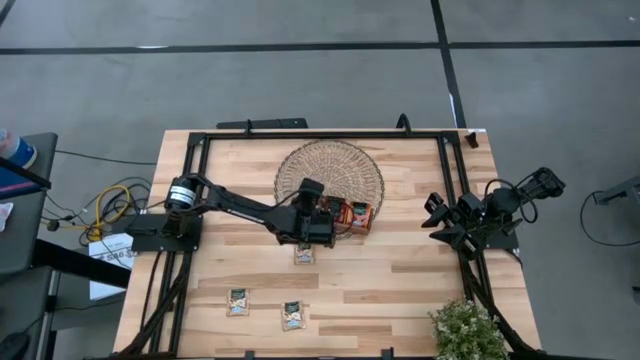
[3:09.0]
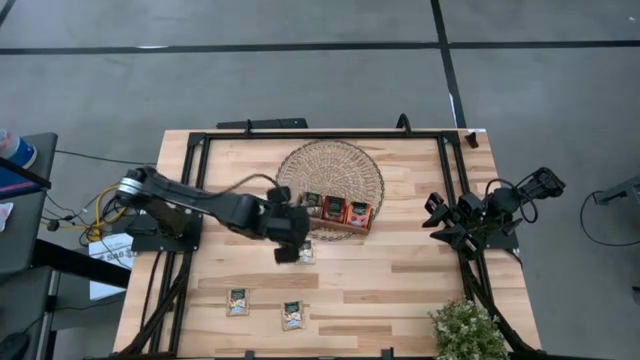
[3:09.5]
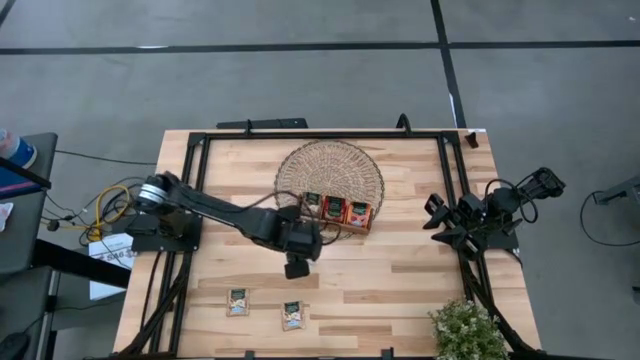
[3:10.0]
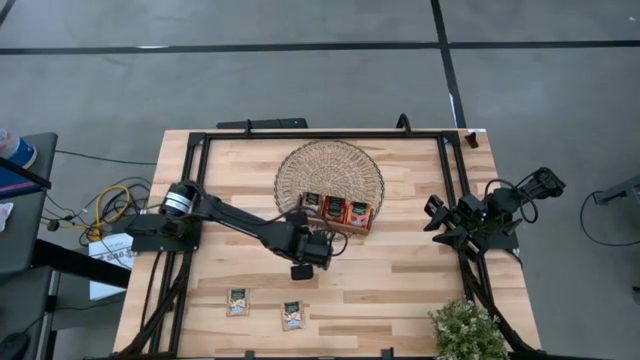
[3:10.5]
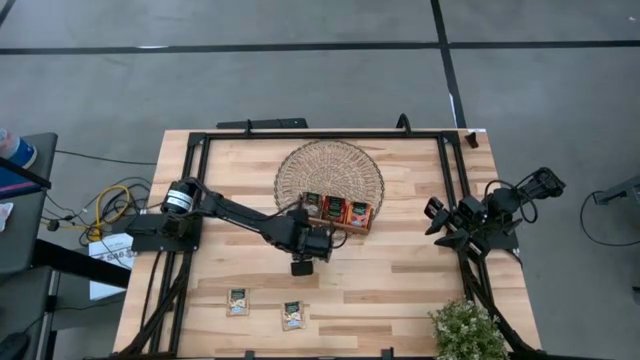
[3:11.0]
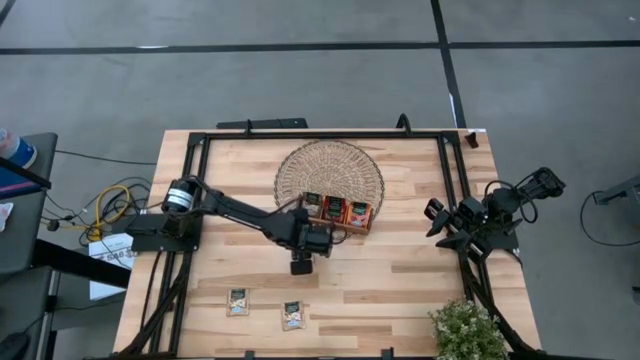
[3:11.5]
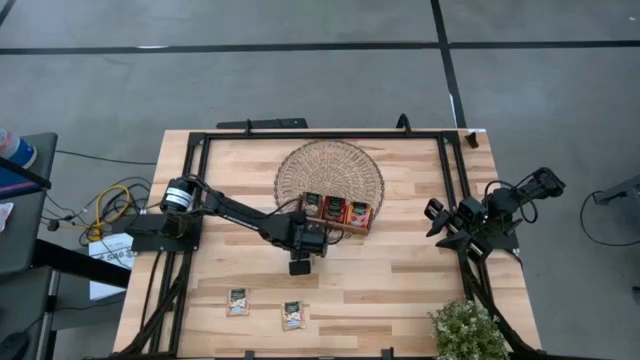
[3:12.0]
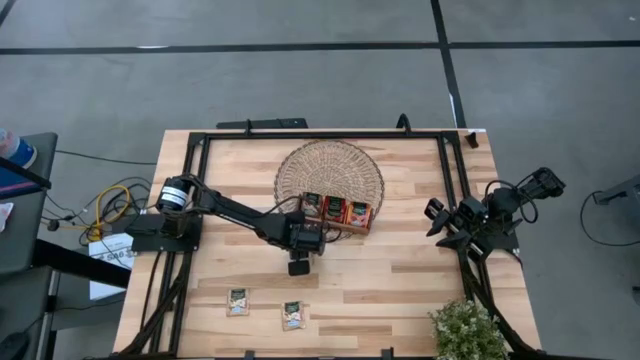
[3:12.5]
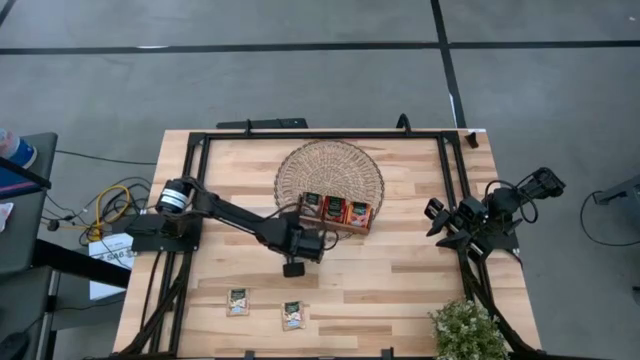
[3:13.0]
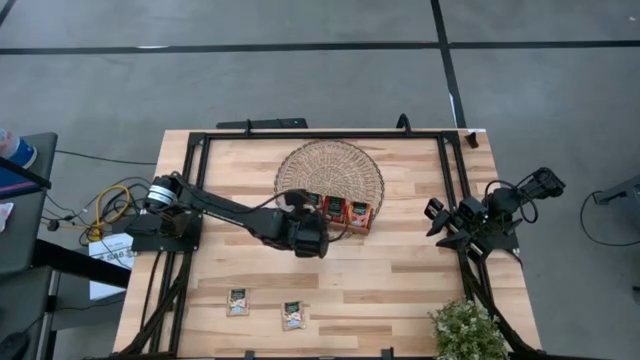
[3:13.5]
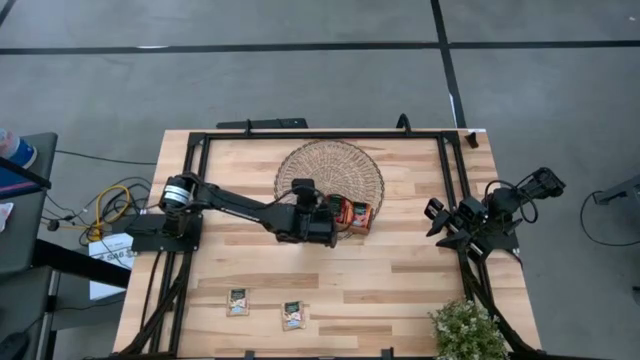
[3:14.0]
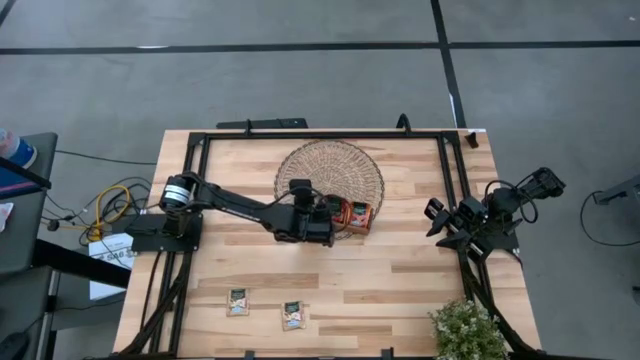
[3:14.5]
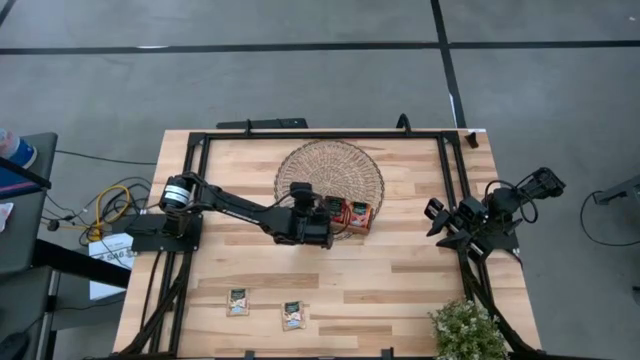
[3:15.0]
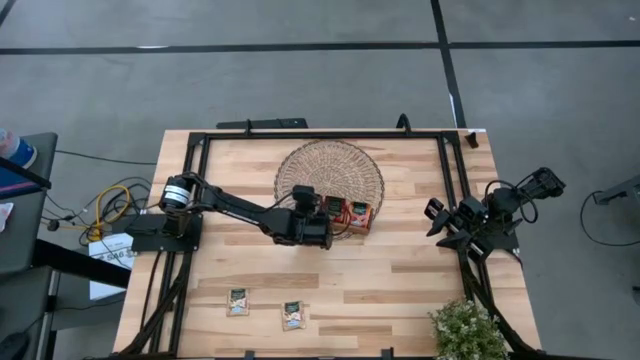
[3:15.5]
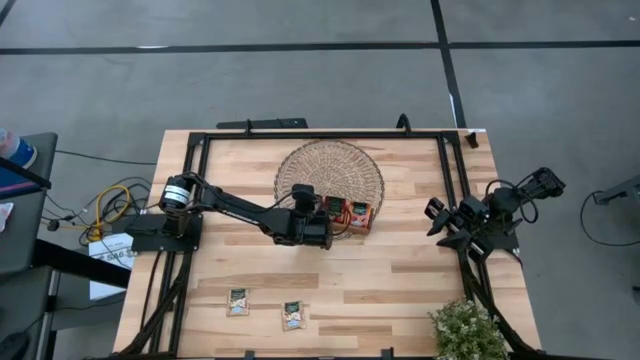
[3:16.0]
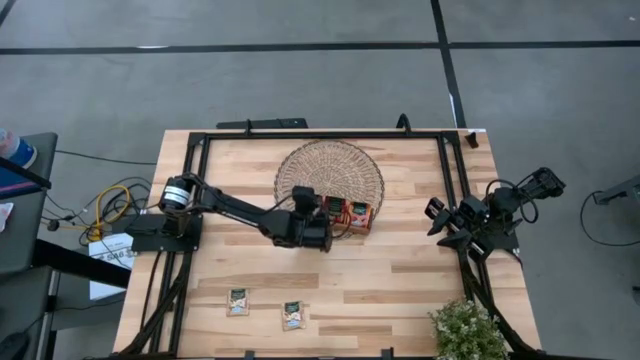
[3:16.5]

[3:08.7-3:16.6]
Task: Pick & Place Tea
Put the brown tea bag into the left section of the wooden organizer

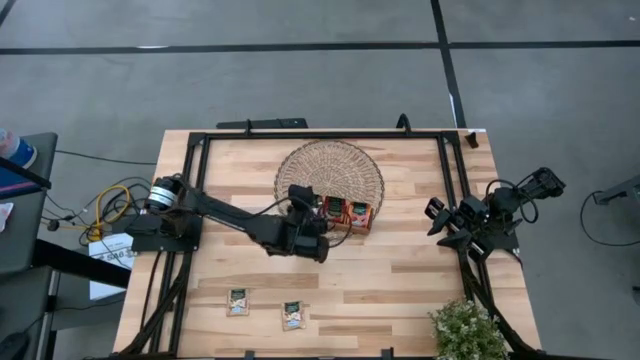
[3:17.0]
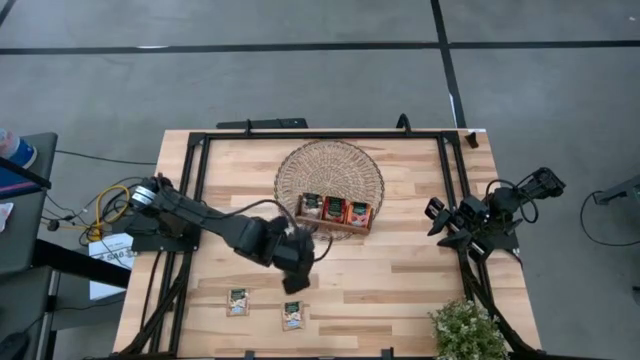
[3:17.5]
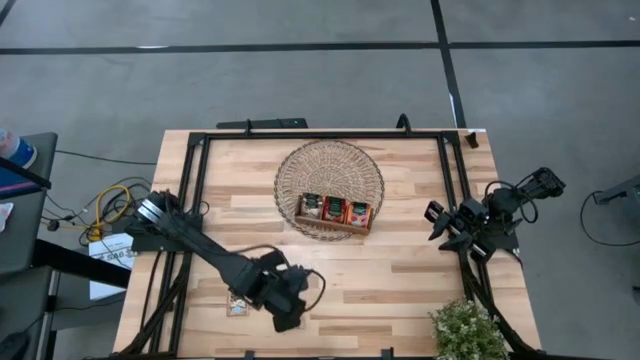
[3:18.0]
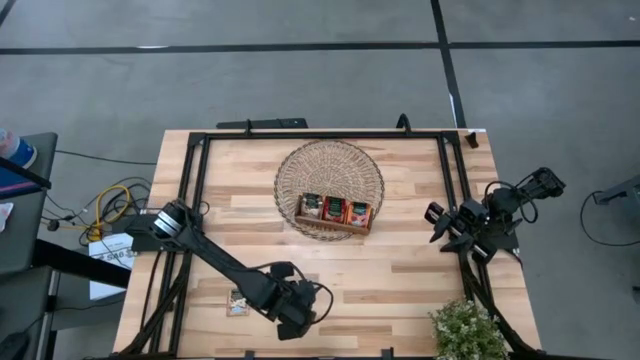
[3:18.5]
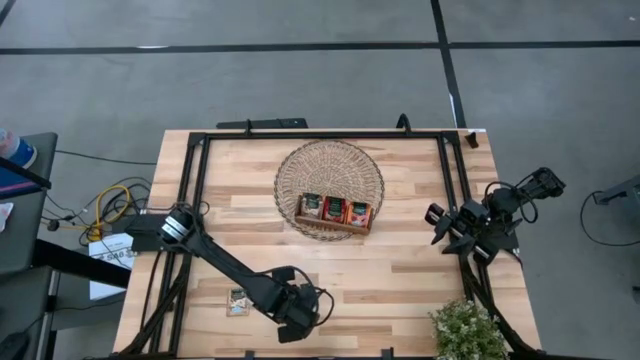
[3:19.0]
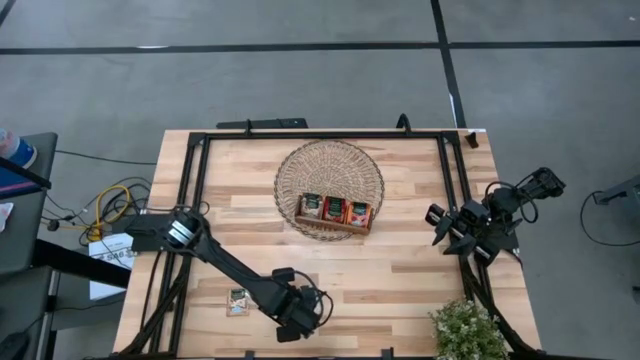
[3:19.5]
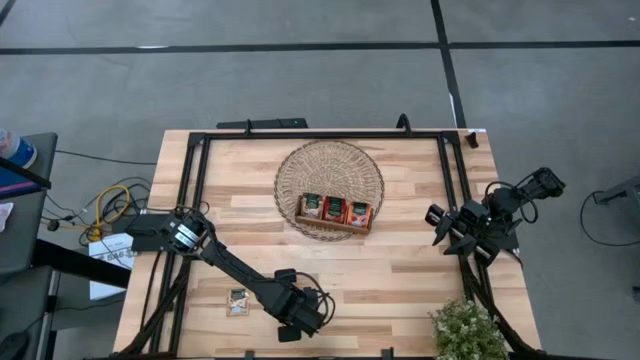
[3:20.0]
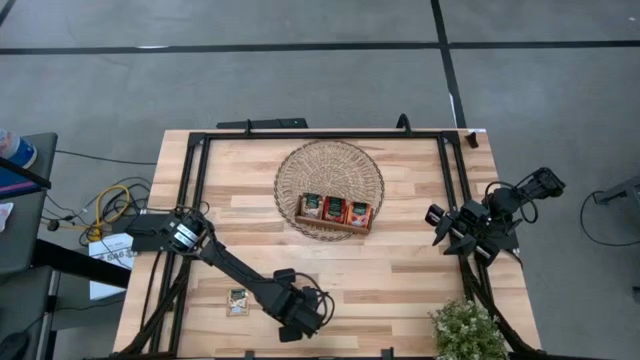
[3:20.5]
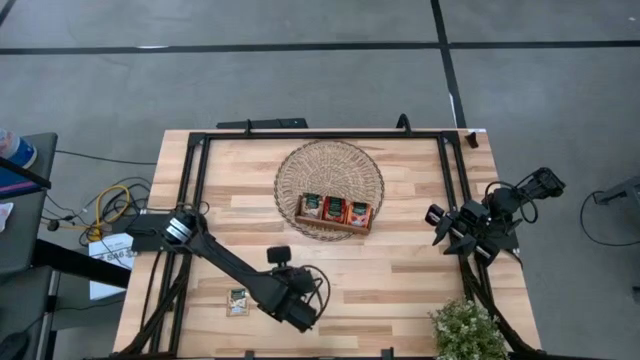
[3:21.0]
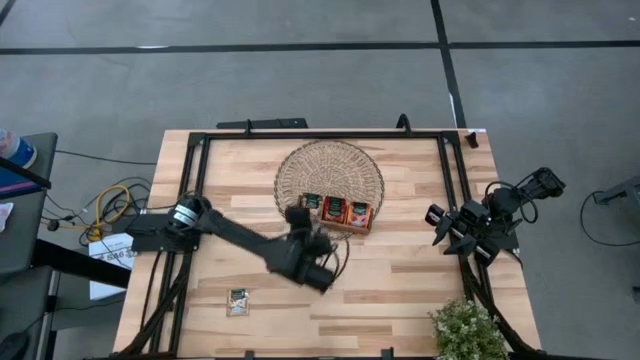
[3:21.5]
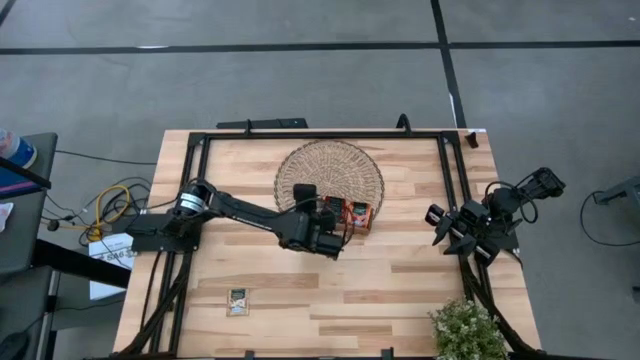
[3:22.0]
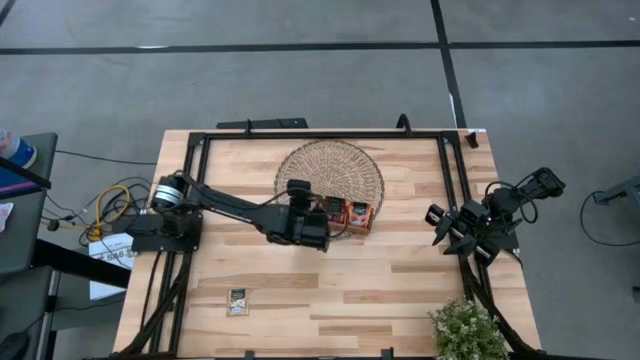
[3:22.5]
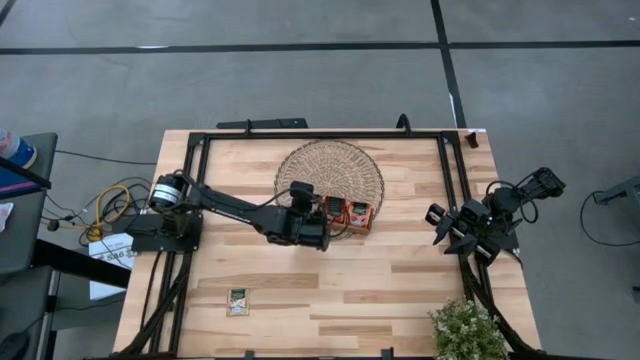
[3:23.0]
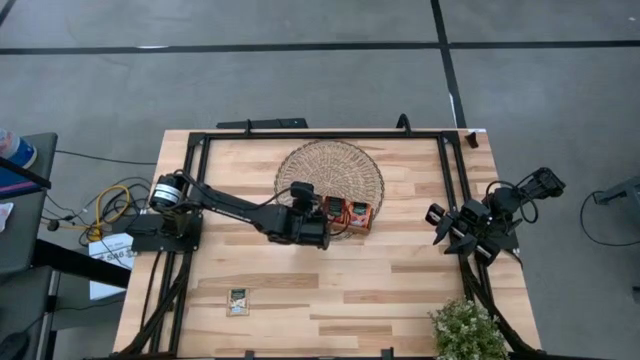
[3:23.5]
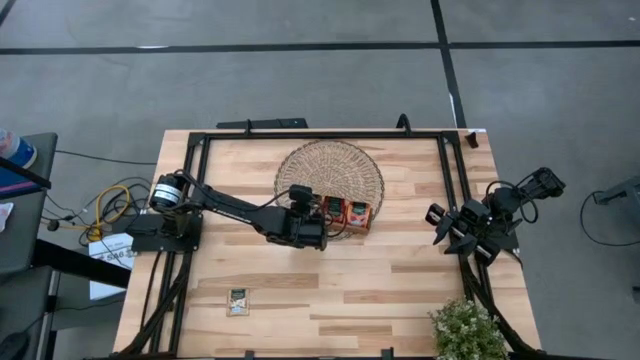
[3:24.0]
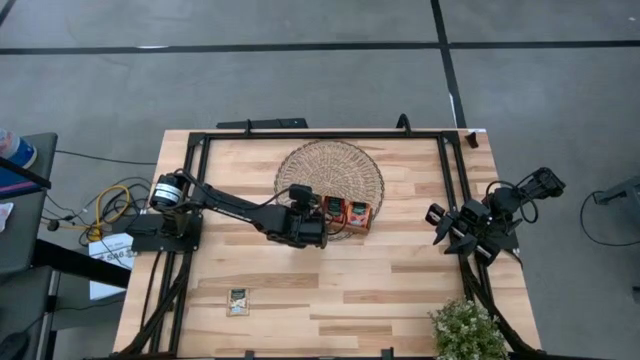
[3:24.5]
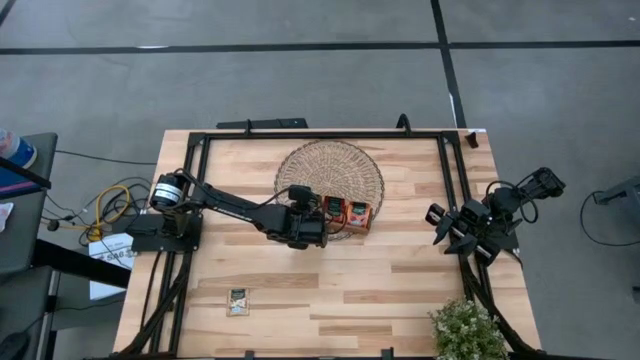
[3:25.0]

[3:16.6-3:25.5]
Put the brown tea bag into the left section of the wooden organizer
